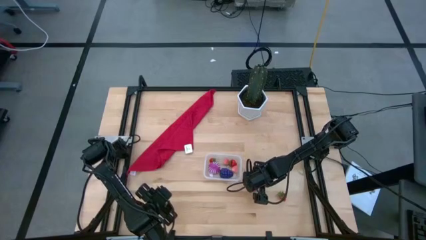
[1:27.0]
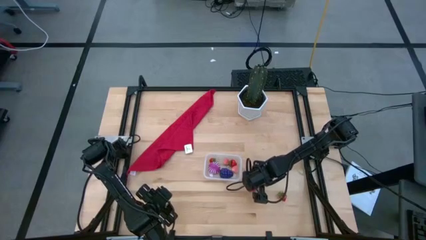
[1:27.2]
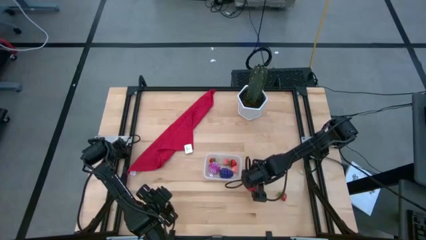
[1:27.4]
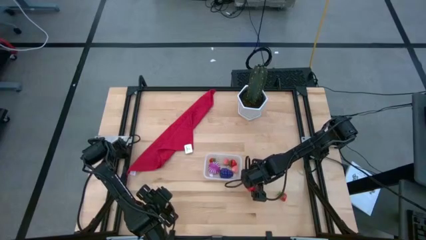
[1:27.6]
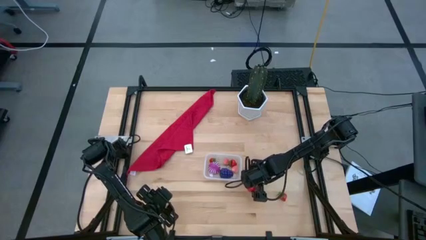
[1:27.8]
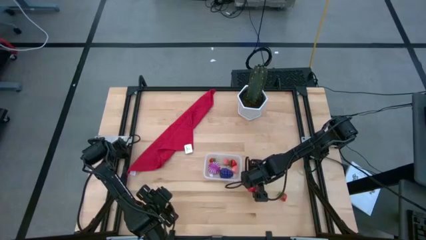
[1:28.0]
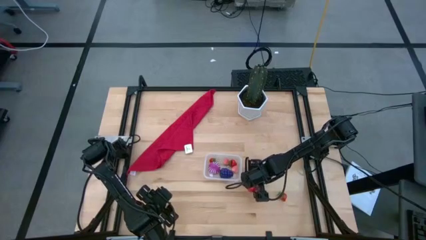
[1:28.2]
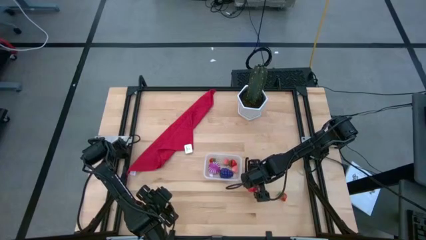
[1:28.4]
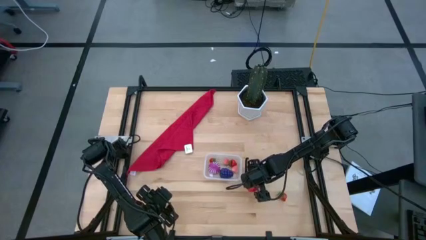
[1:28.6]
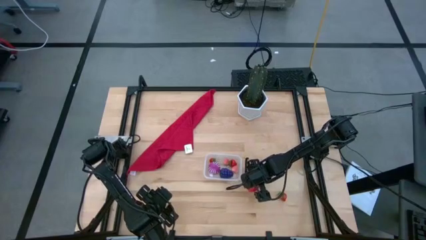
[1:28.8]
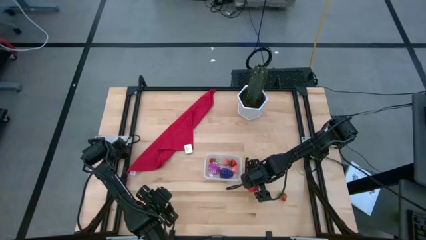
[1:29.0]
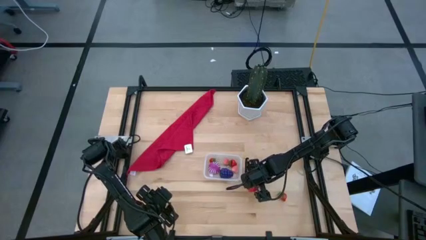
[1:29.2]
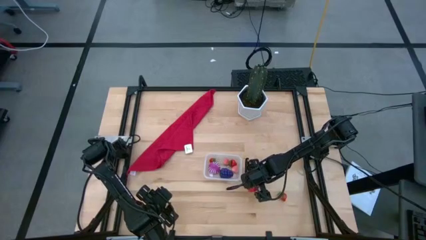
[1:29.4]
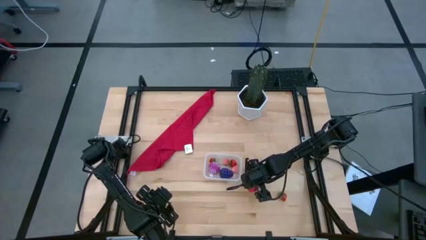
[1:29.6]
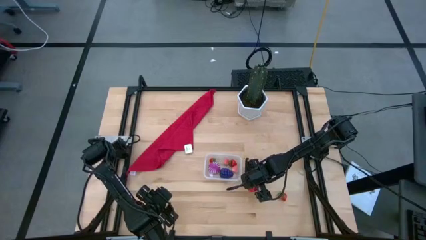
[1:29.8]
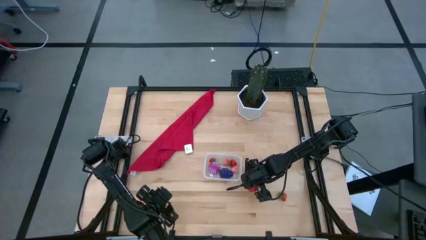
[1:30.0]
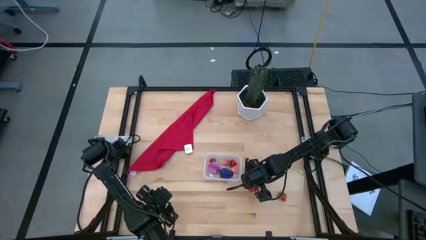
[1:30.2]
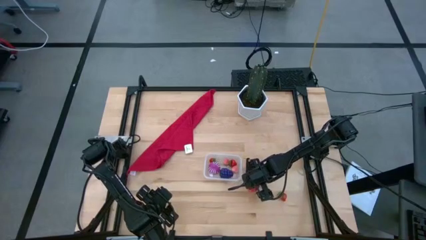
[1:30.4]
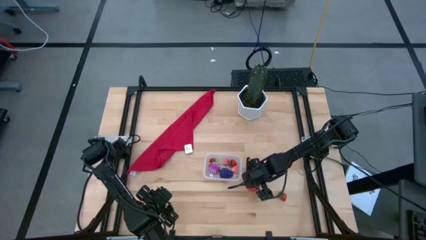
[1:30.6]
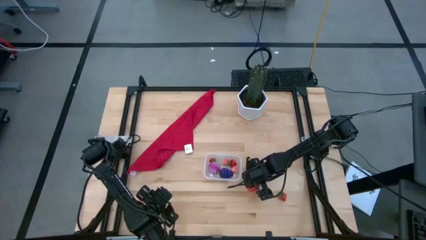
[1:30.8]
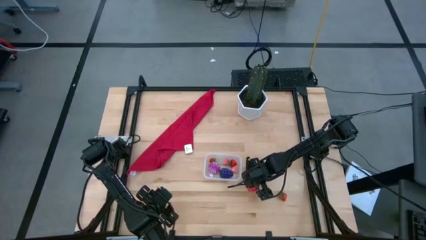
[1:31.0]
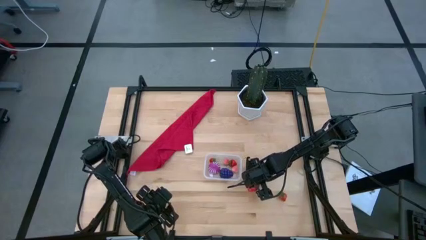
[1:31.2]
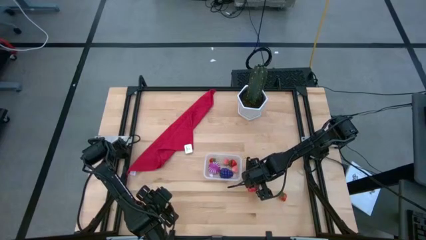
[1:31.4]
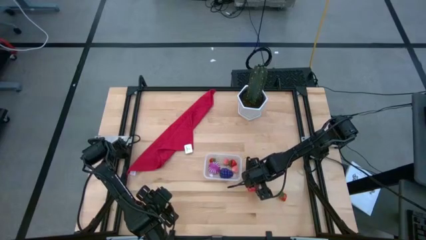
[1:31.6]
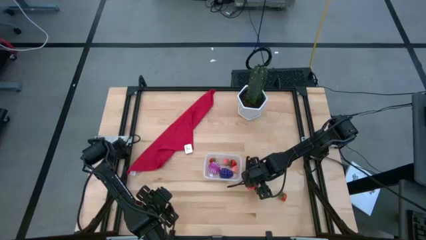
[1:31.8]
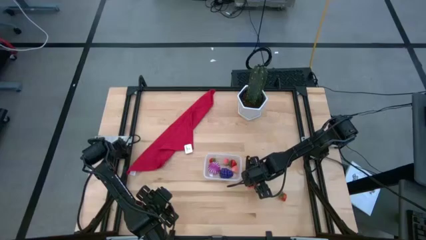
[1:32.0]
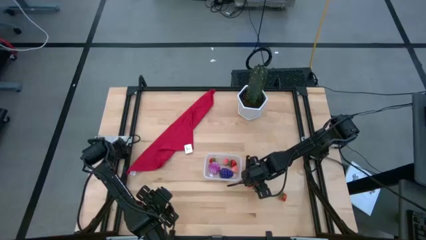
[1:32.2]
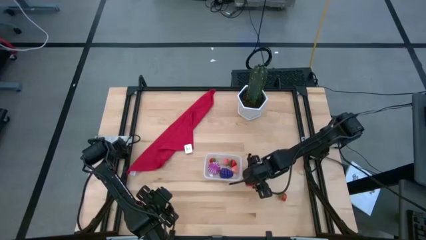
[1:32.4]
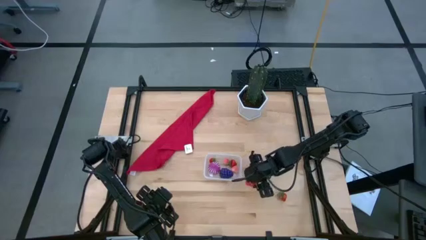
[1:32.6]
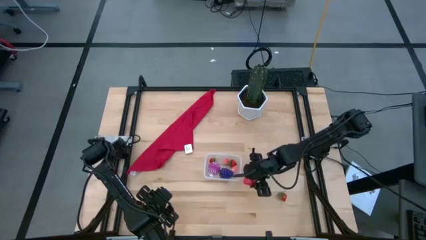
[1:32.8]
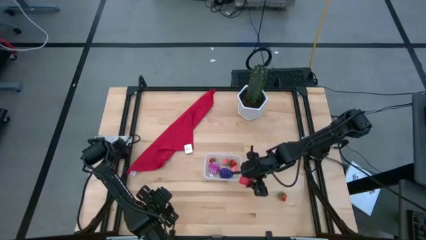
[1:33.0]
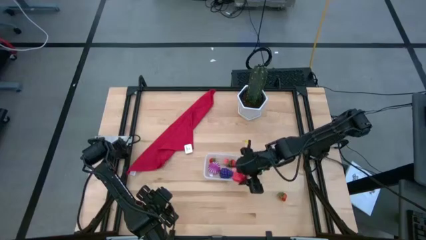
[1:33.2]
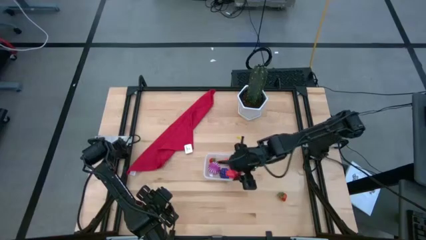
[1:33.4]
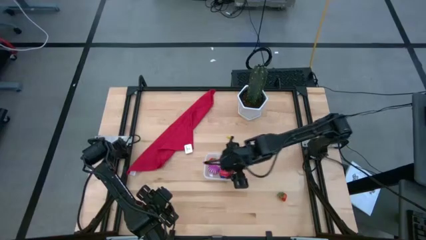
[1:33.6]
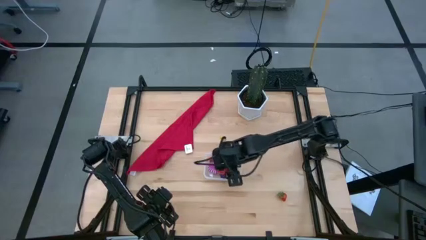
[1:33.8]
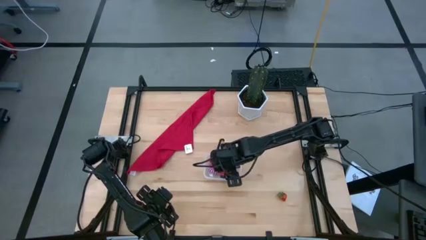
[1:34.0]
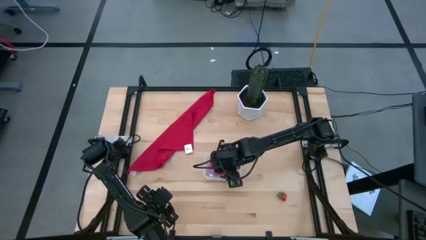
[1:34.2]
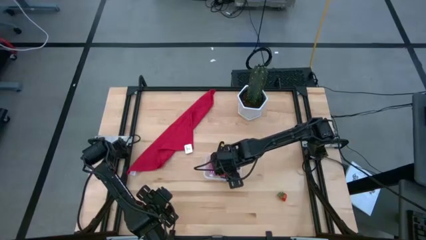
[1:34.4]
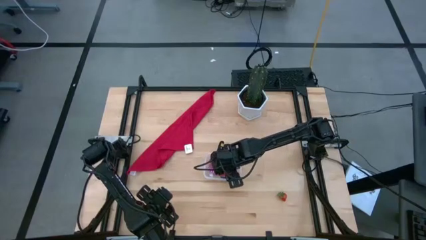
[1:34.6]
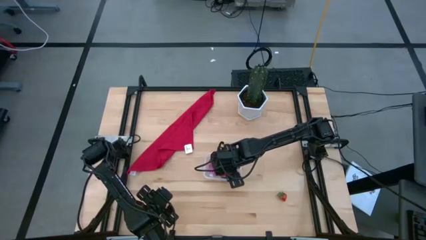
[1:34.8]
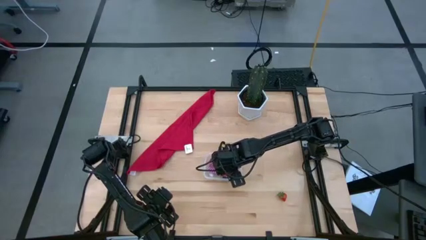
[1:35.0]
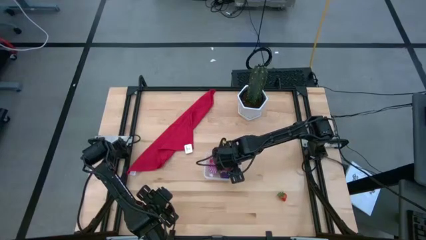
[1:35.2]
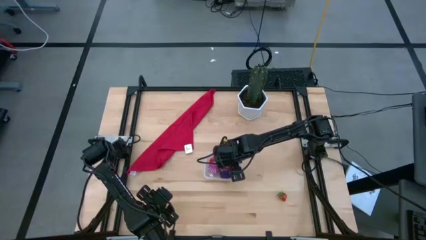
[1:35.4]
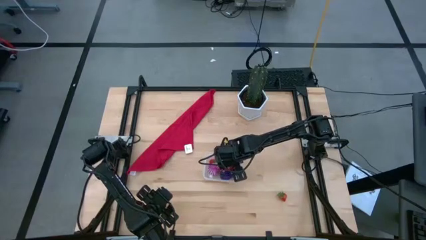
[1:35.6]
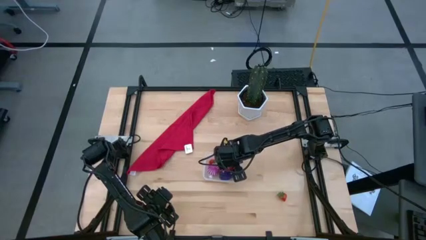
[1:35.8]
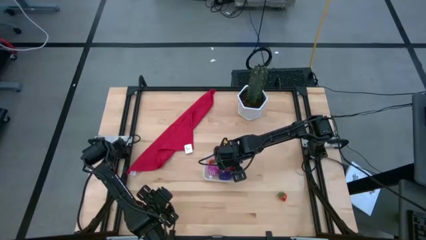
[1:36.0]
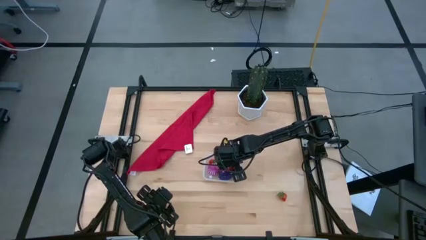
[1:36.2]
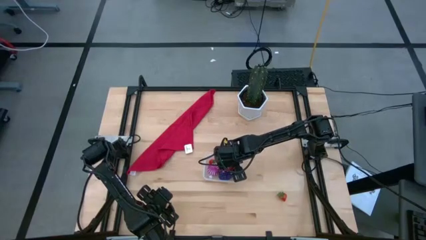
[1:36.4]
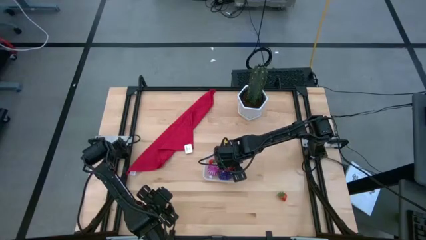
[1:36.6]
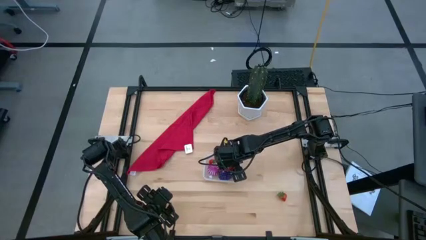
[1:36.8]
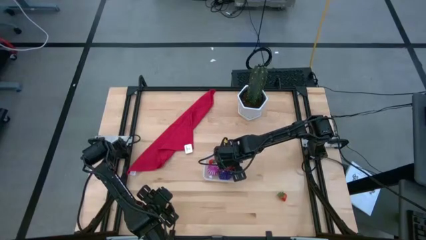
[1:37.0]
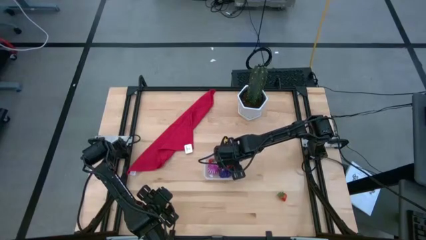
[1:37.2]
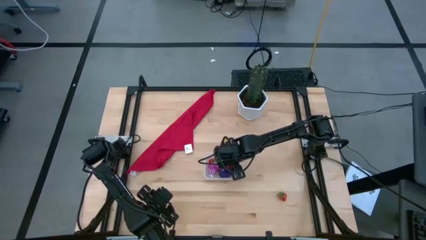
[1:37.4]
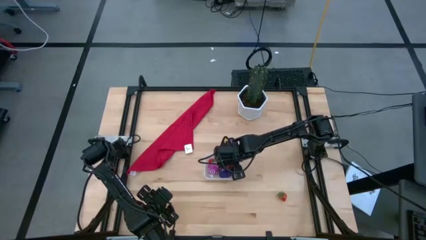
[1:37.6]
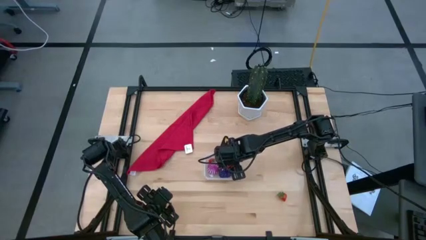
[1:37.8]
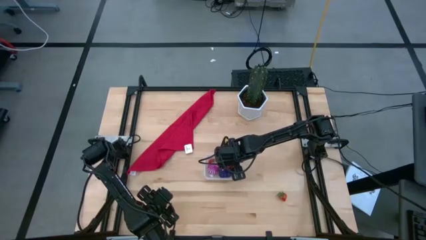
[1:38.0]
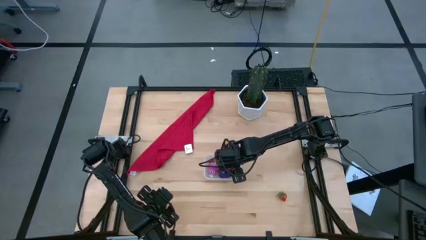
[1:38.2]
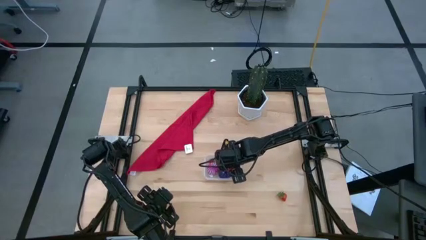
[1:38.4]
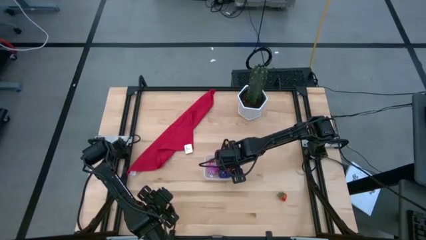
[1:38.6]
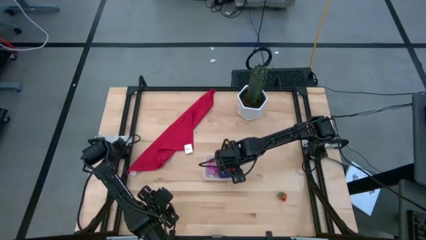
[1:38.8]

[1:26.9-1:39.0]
Task: Pick and placing Produce into tupperware
Put the pink dragon fruit into the transparent bin
